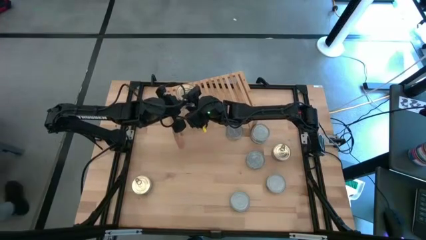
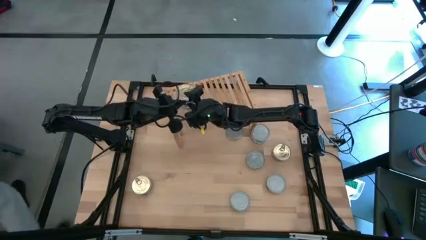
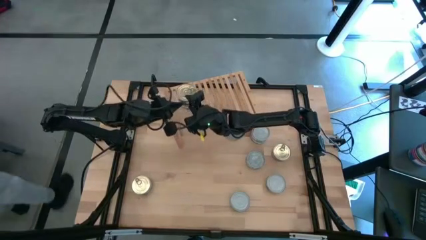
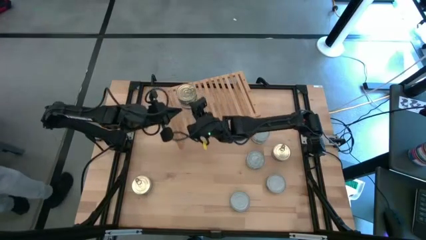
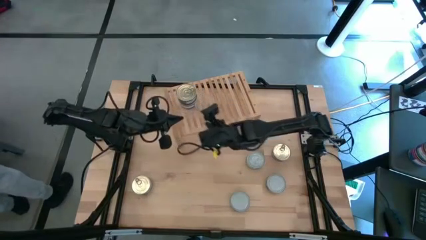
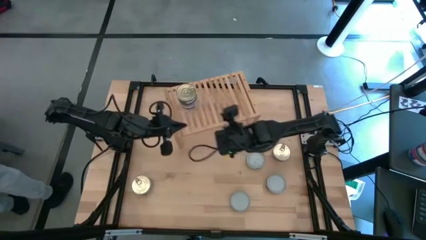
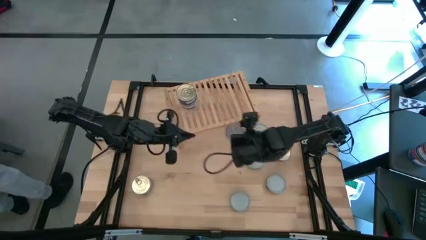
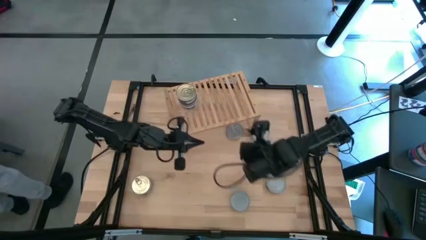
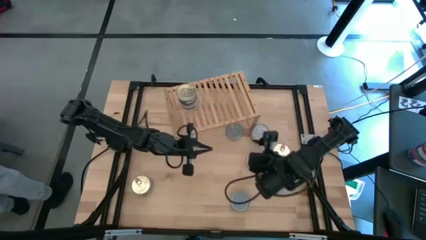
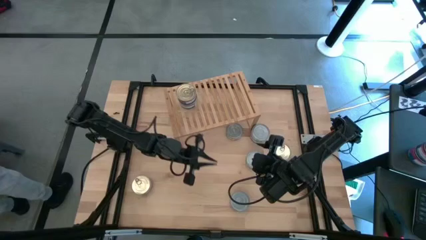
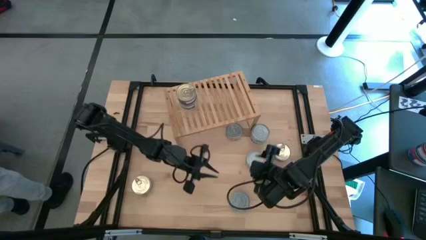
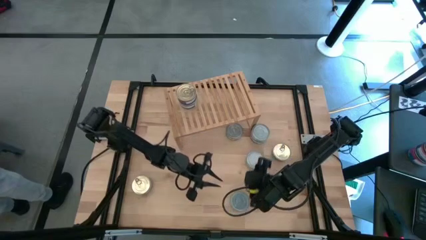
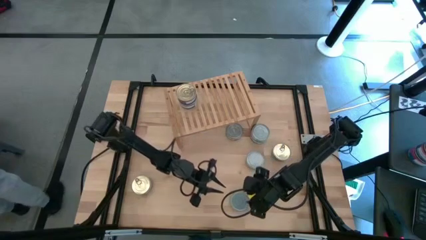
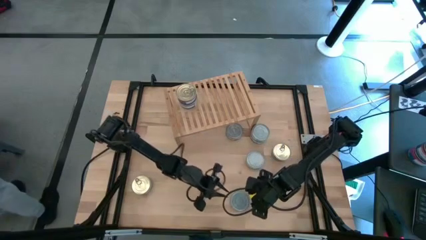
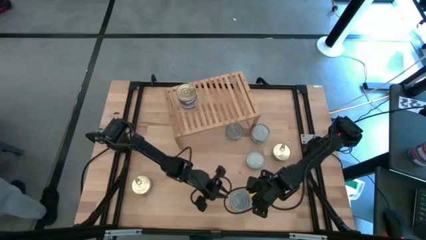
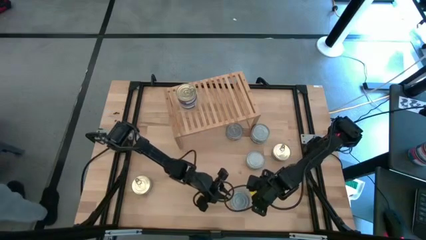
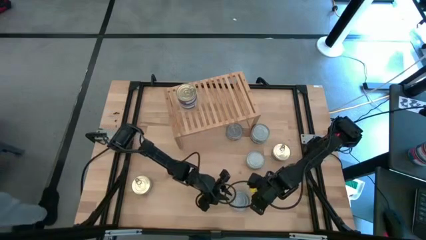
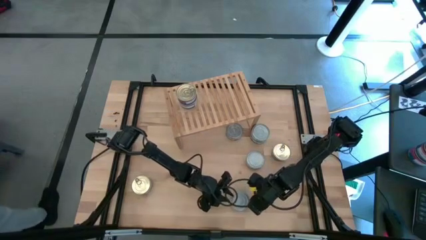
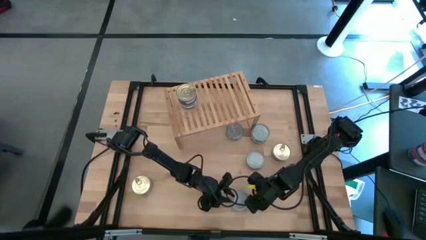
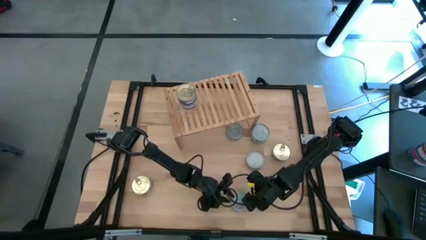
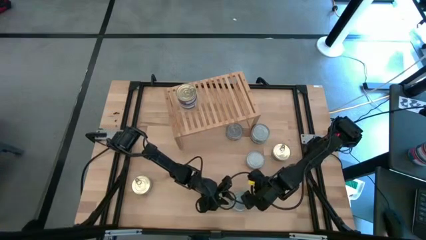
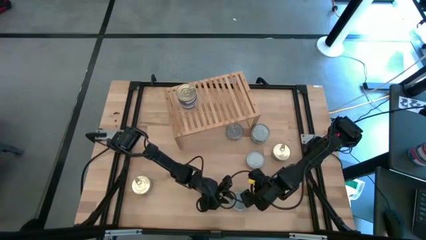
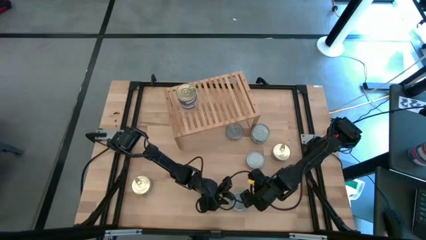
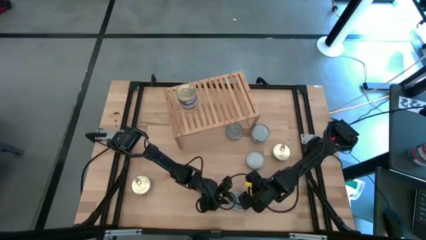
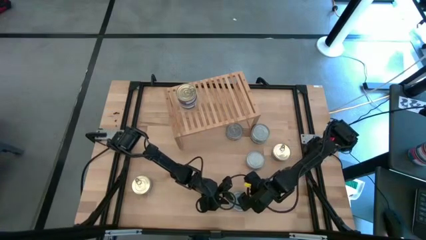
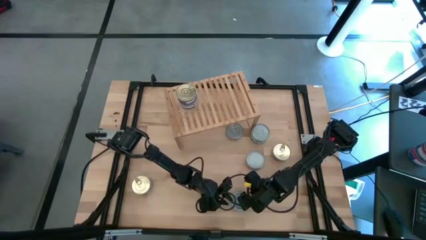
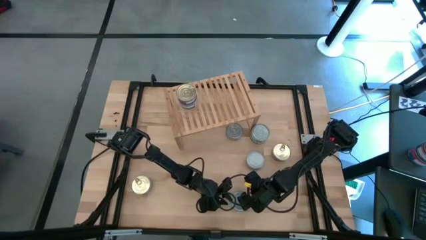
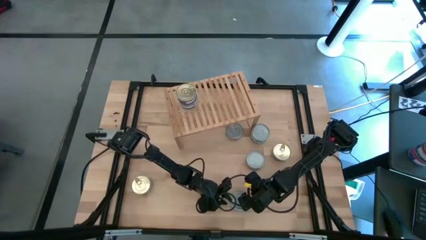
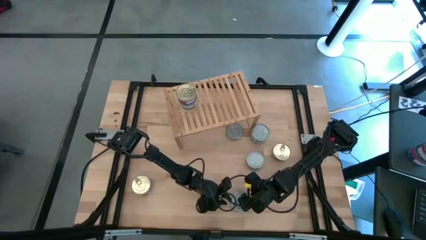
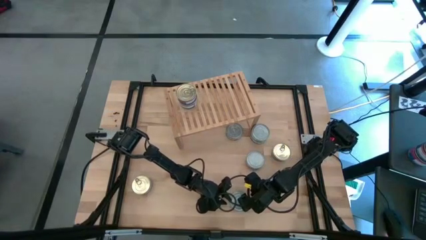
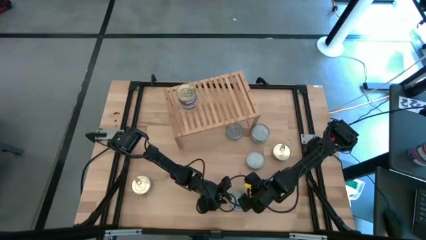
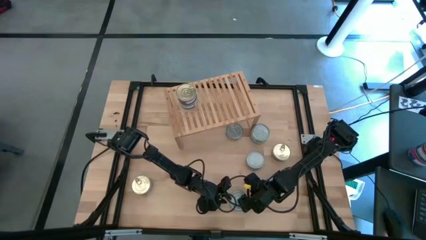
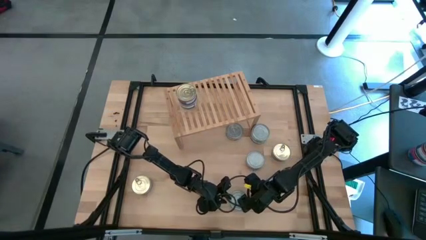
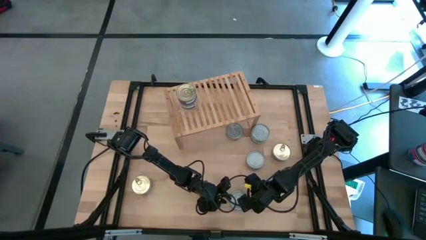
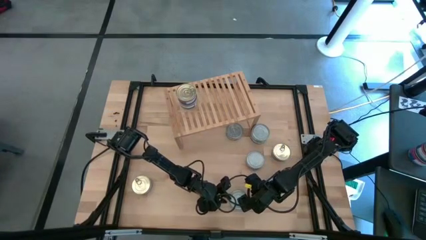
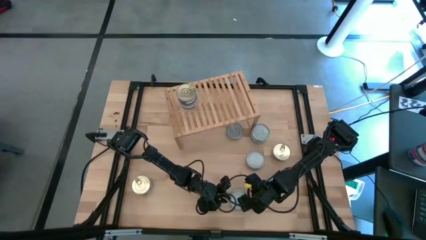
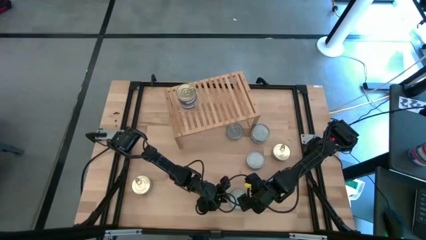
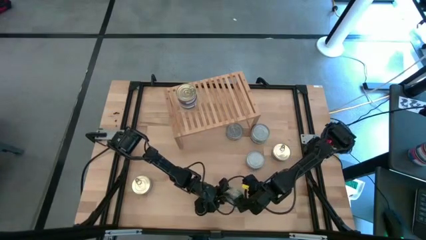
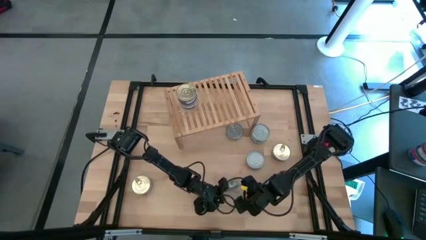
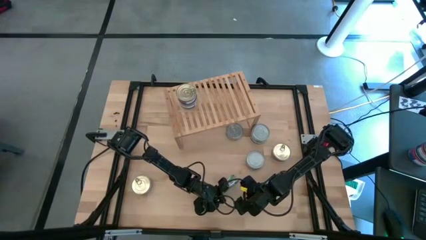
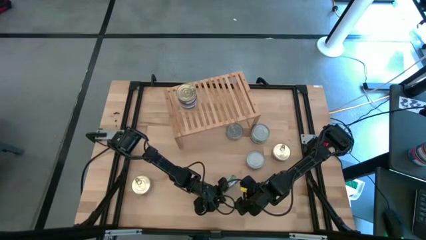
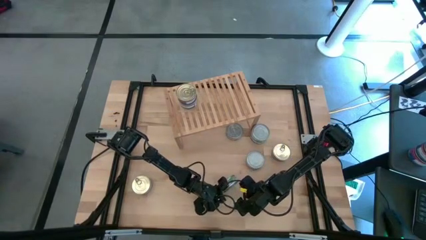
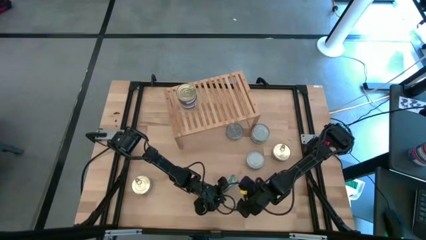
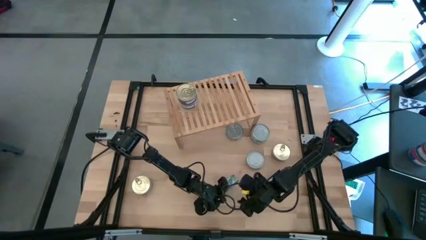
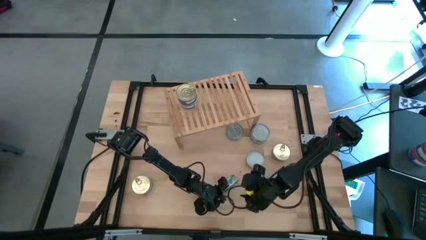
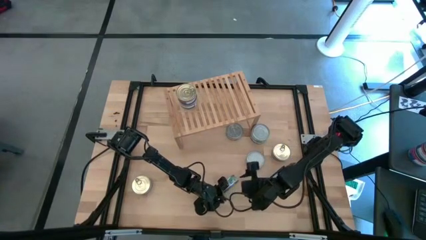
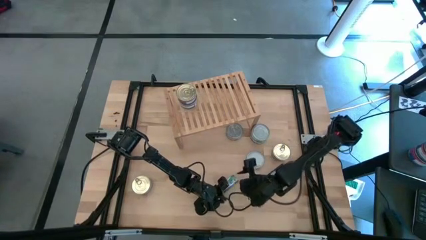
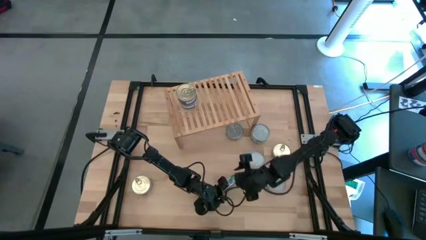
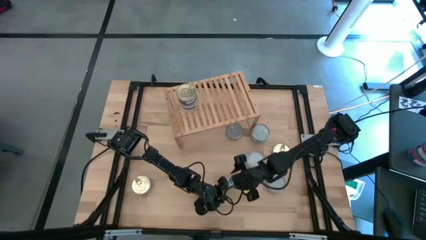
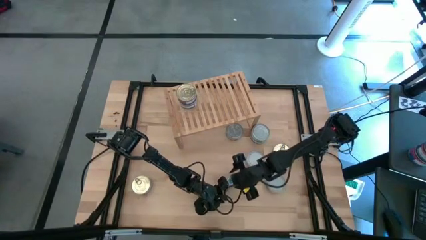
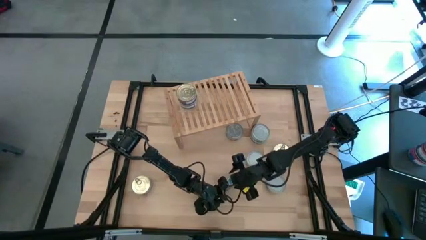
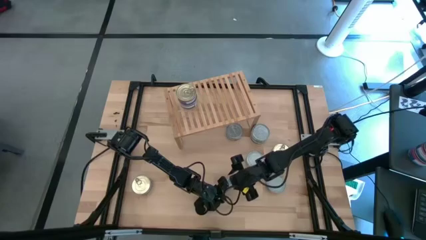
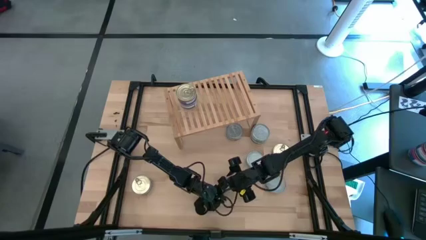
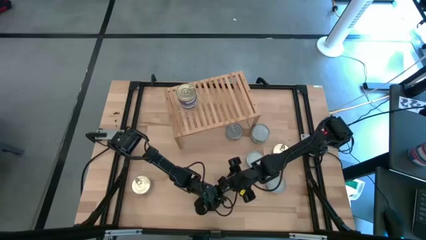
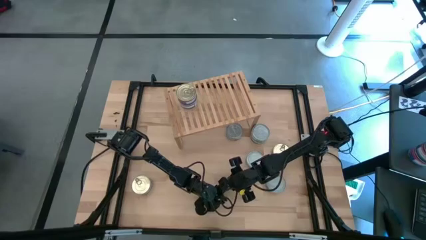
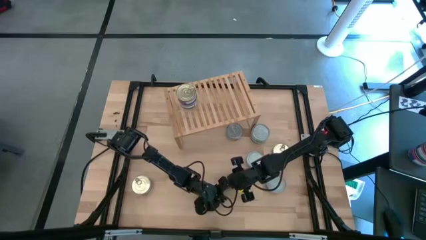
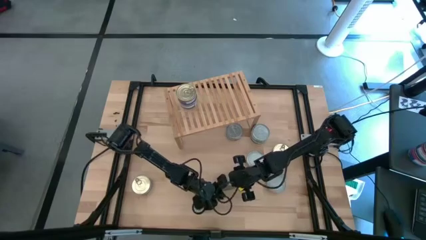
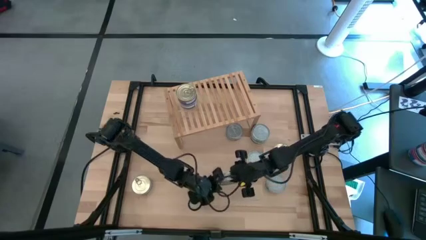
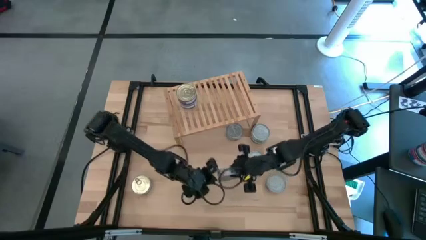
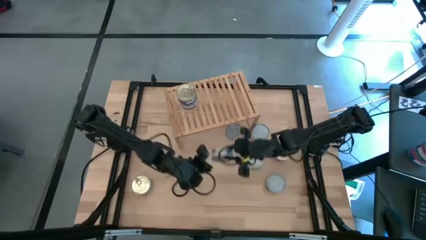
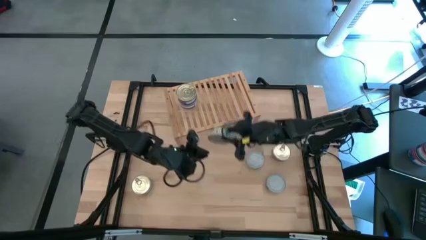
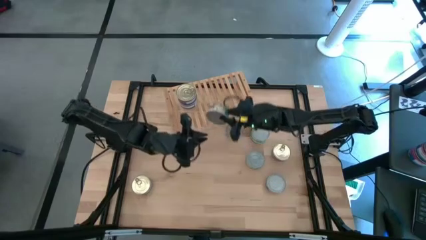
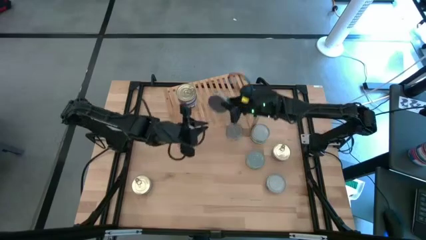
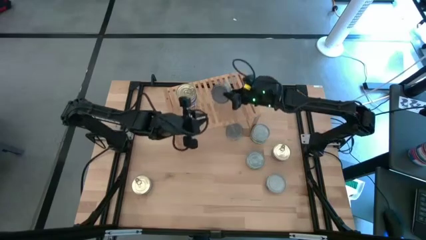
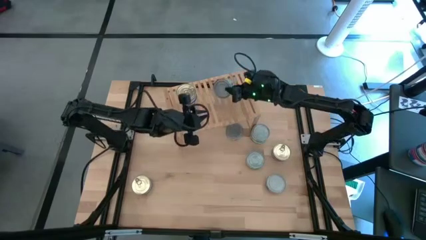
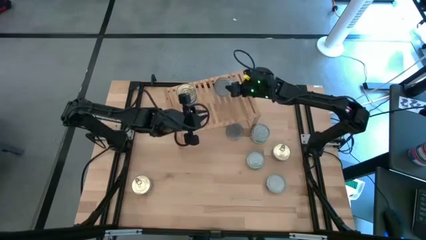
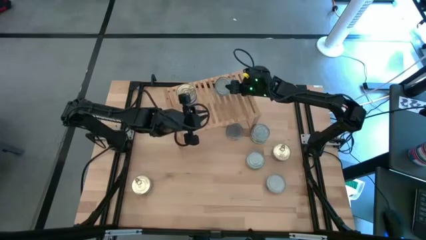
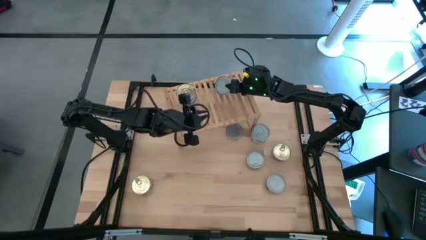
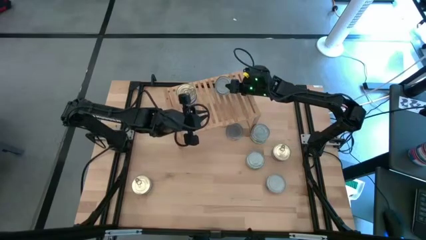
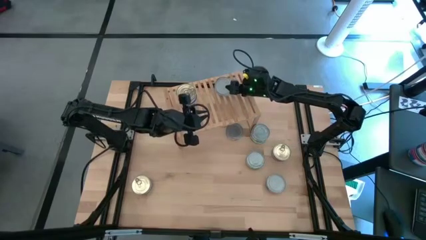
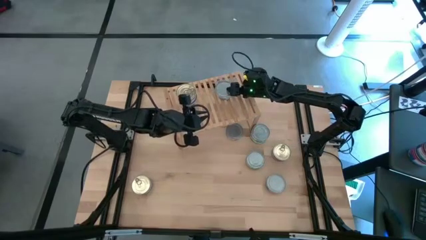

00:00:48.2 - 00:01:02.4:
Task: Stack canned seafood by type on shelf
Put the green tuna can on the shelf
